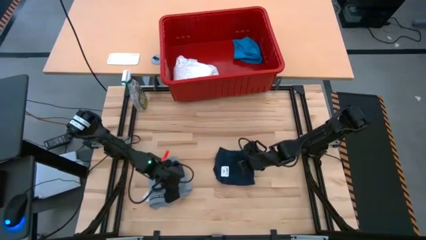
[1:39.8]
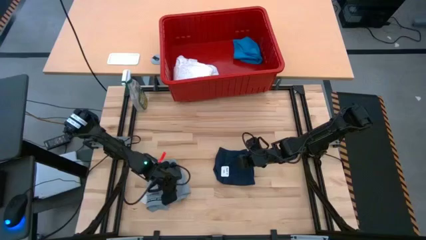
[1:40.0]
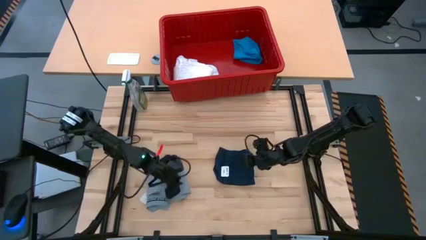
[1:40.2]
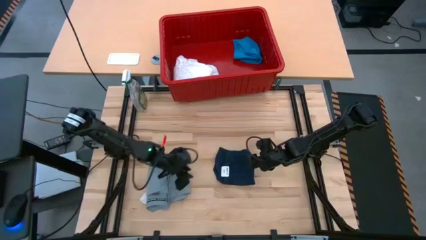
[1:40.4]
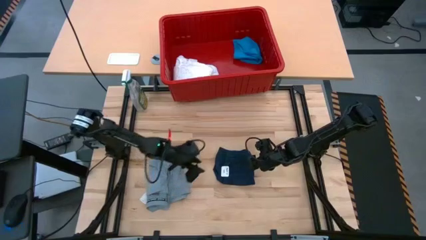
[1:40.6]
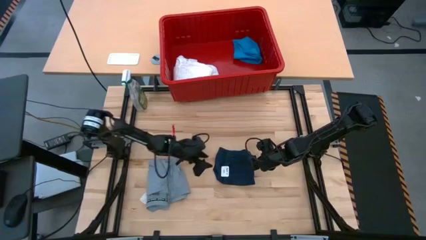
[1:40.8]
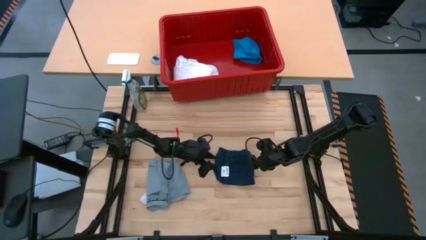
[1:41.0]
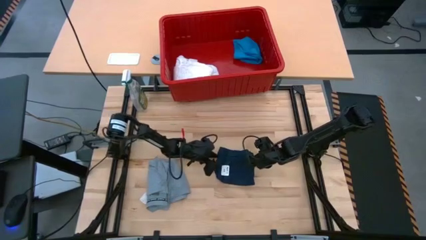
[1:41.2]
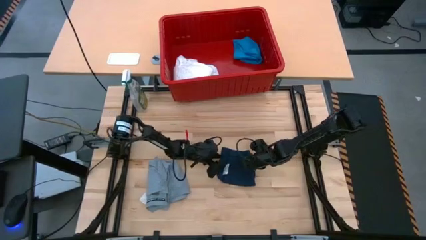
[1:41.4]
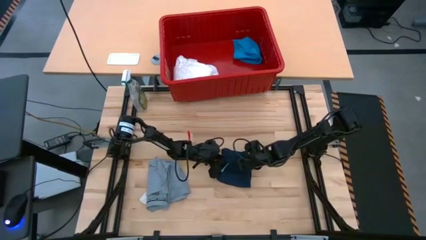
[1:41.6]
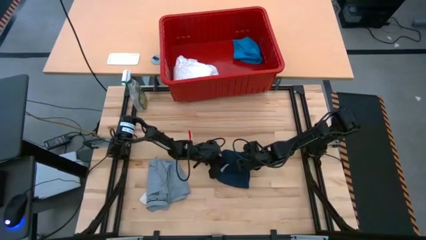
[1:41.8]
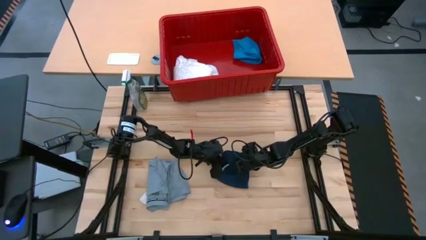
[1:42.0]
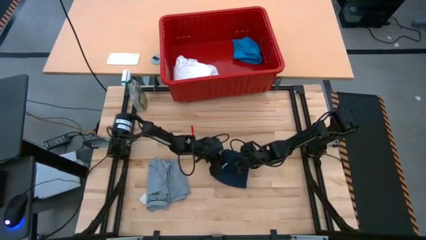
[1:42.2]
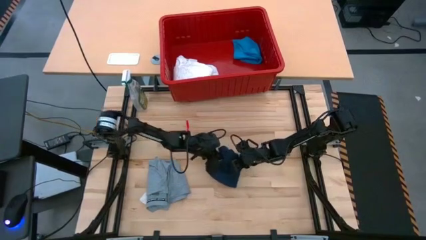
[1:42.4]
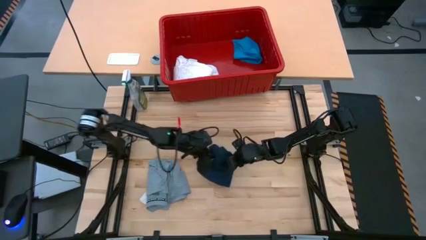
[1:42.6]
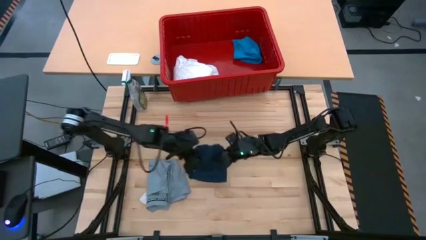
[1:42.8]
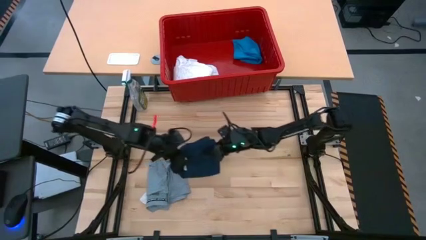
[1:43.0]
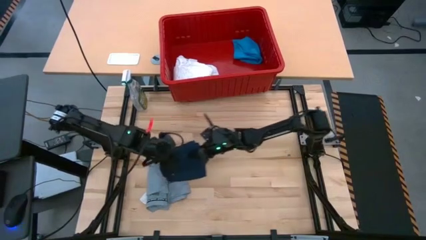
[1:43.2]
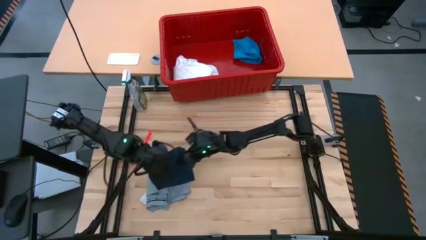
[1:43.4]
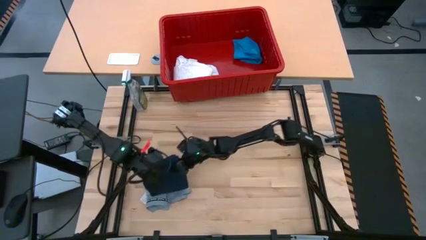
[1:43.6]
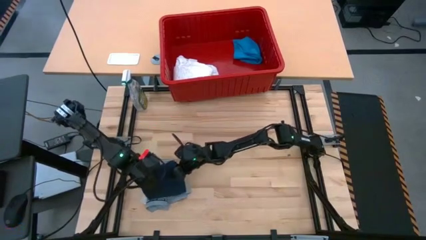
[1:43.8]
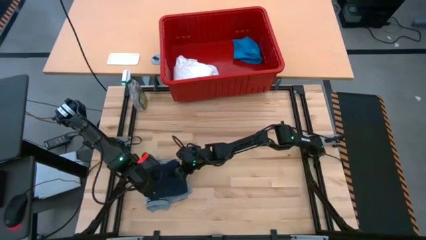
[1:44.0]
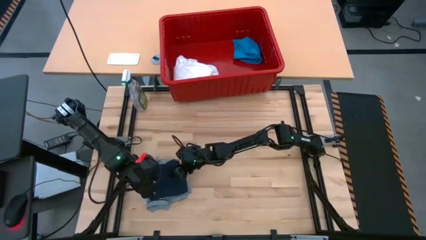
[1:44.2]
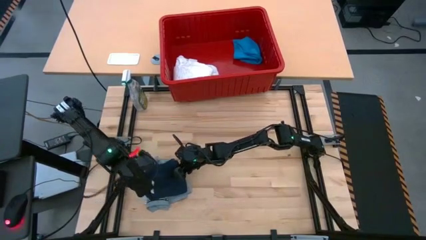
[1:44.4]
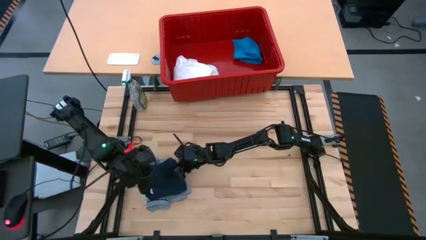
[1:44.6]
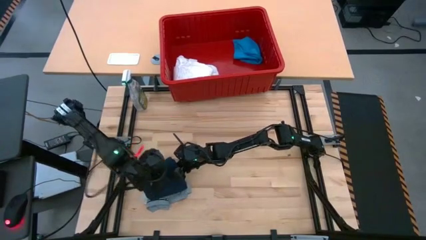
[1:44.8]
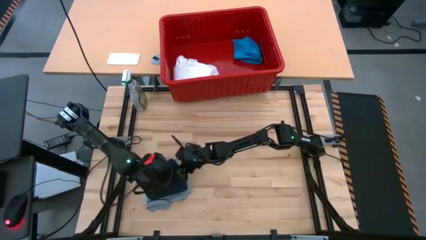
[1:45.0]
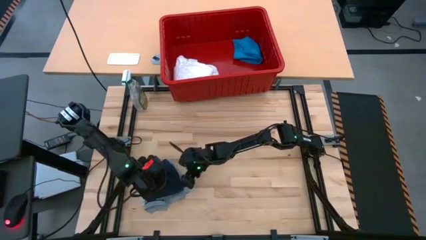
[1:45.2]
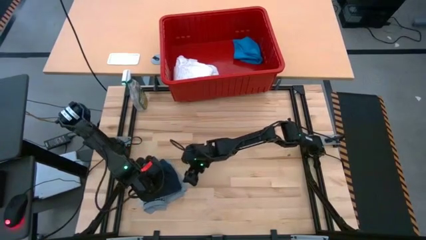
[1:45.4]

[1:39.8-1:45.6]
Task: Fold laundry
Stack the folded black pants on top of the gray shirt

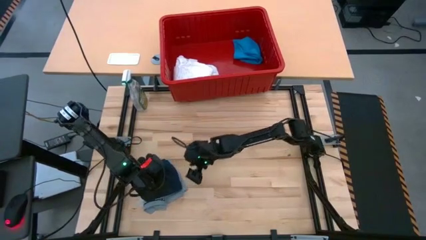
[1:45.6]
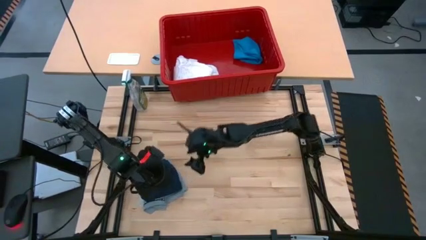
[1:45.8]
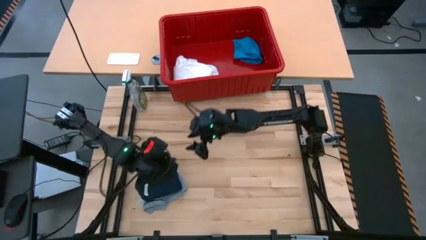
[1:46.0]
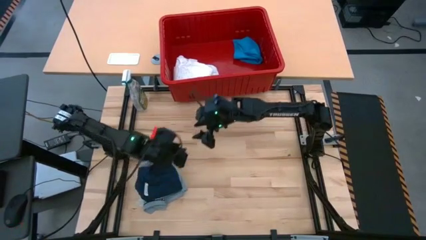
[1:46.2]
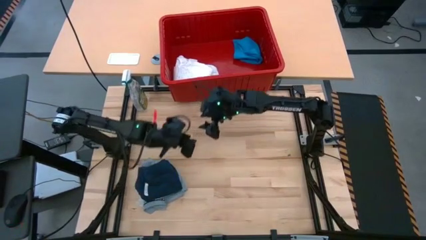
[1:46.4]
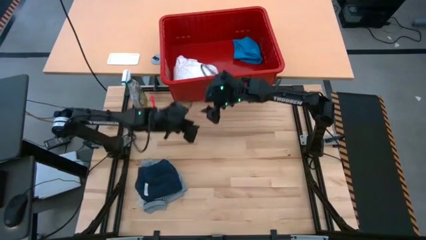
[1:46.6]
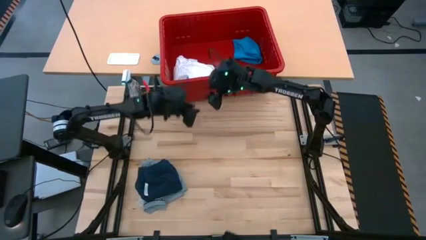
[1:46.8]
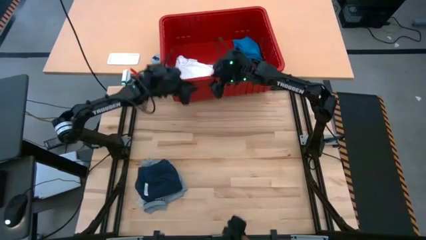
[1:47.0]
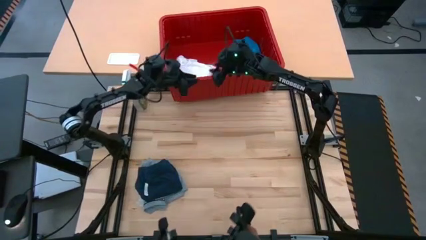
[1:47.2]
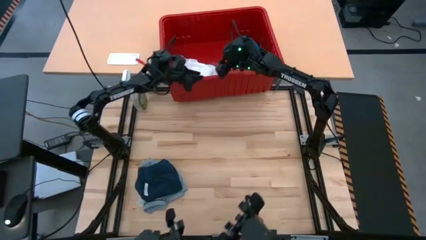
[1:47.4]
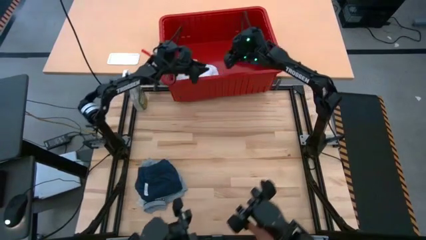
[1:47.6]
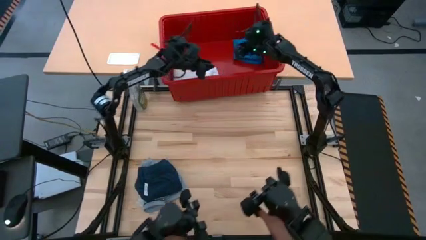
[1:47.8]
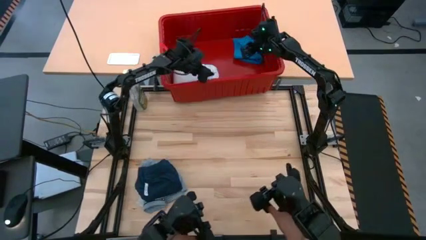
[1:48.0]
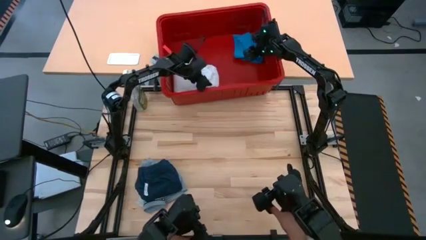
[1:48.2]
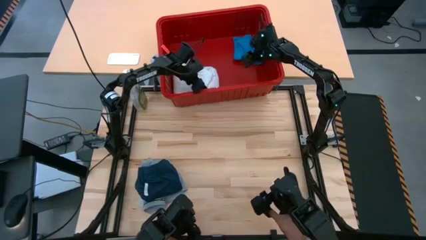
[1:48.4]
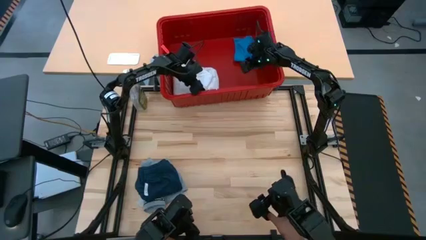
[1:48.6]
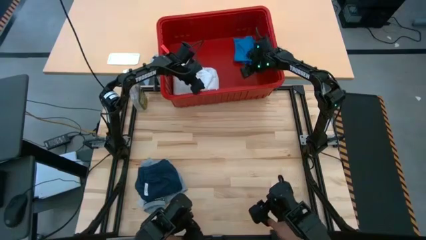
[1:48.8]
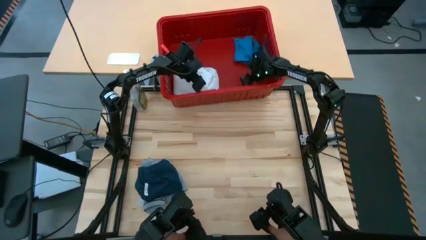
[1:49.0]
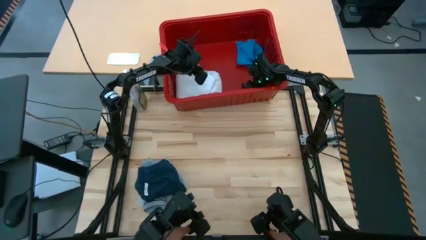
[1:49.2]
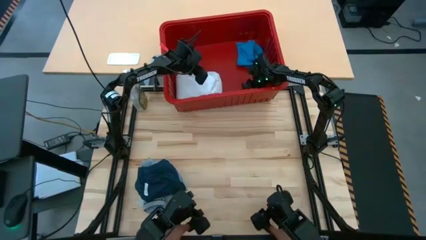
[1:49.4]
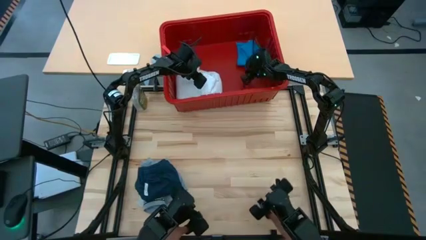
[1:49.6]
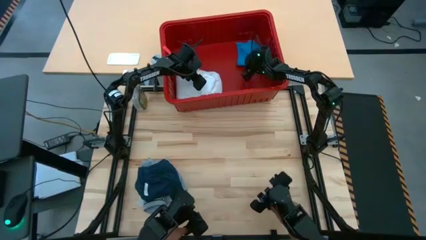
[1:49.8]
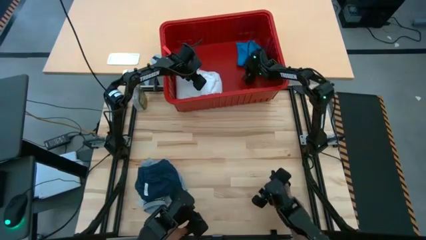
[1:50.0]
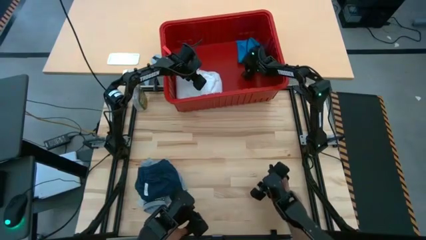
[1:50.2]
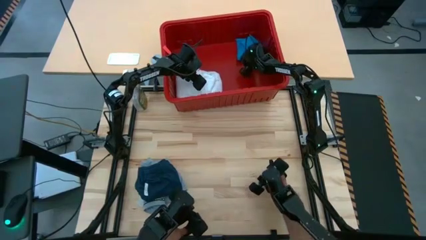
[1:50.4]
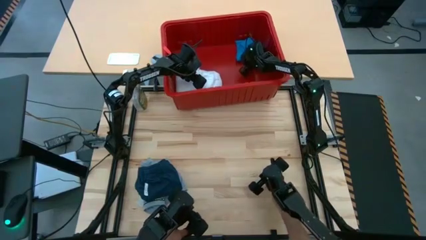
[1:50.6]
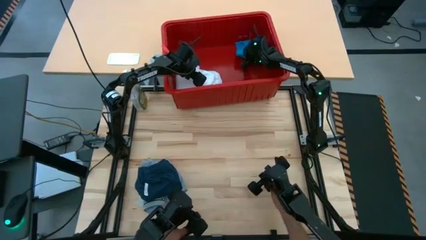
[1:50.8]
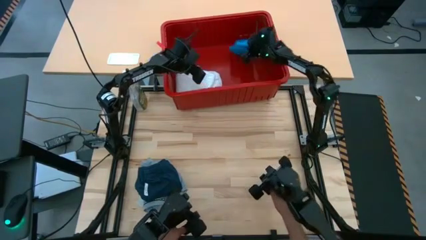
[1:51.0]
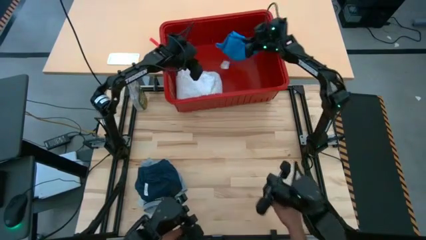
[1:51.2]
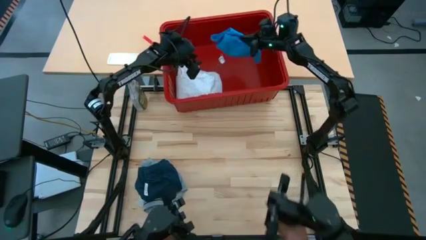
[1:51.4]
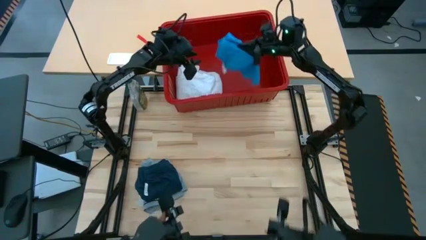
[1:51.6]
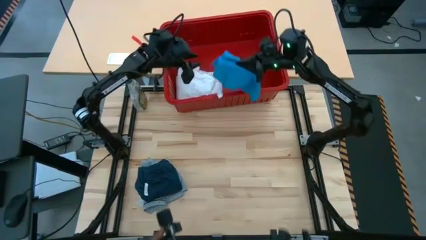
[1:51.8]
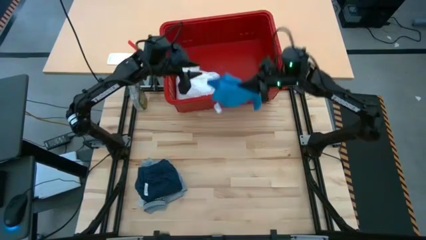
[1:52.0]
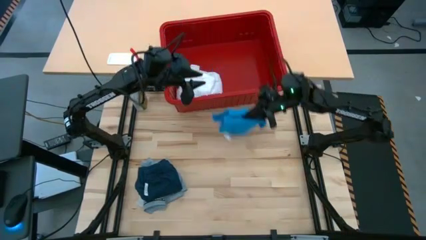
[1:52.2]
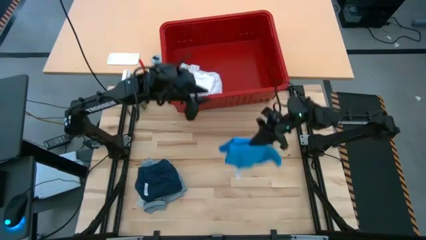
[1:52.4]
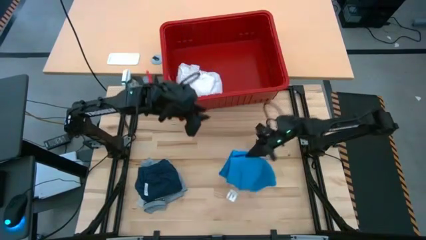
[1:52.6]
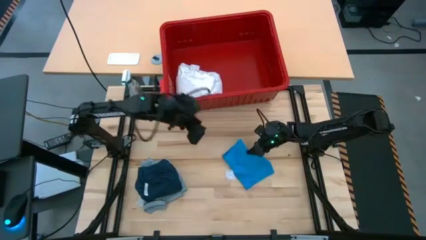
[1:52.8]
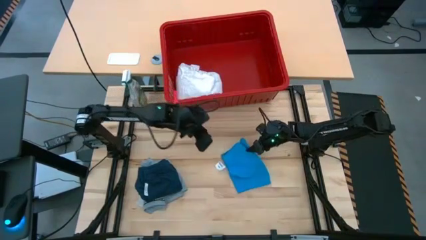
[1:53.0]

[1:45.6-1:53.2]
Remove the blue pants from the red laundry bin

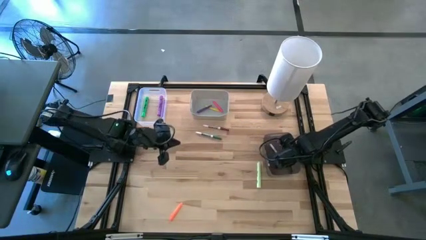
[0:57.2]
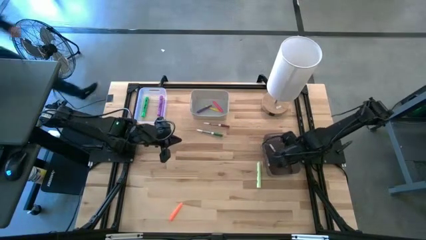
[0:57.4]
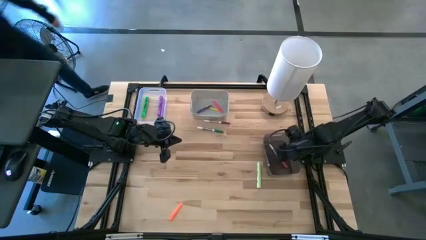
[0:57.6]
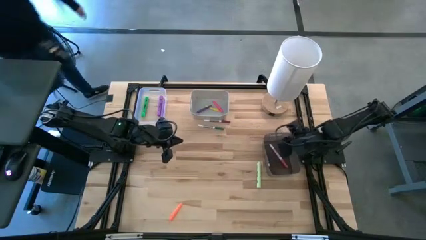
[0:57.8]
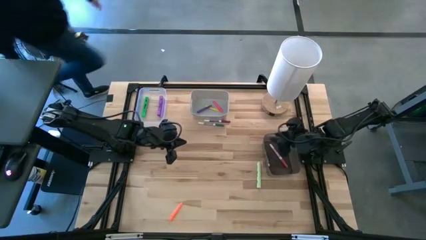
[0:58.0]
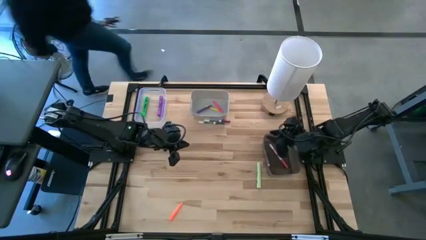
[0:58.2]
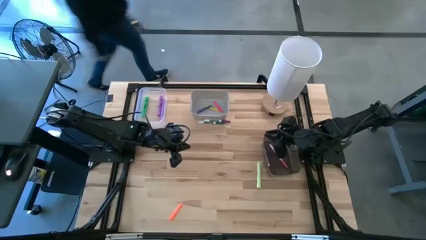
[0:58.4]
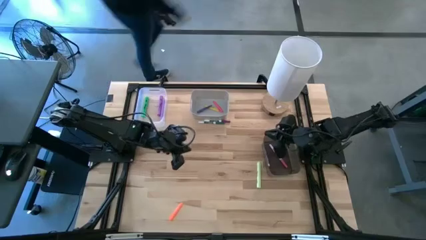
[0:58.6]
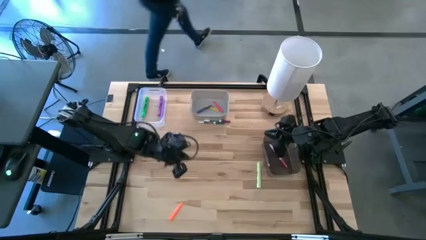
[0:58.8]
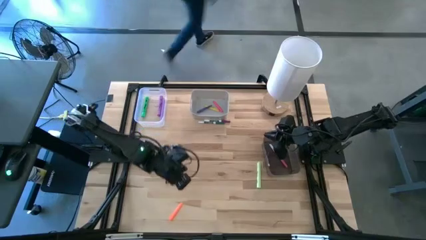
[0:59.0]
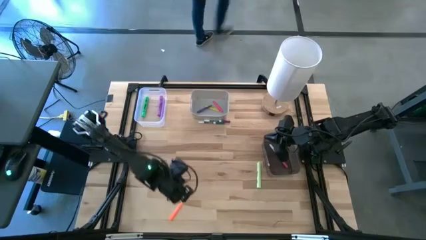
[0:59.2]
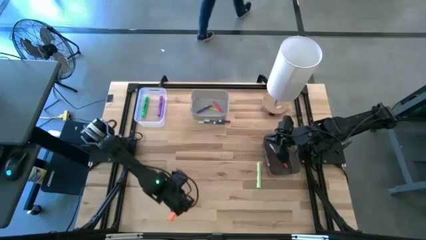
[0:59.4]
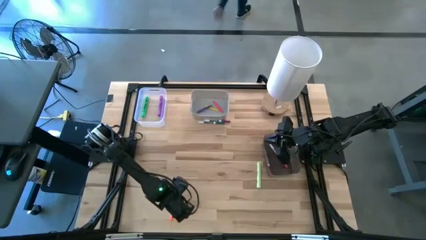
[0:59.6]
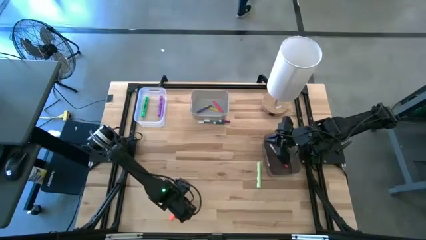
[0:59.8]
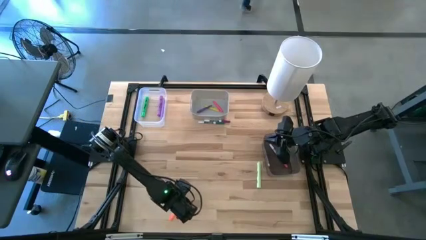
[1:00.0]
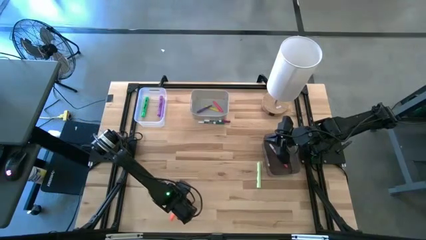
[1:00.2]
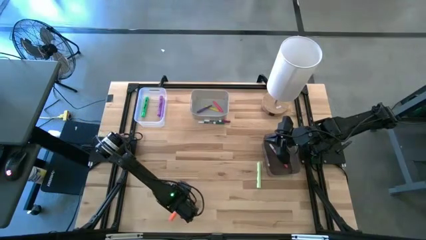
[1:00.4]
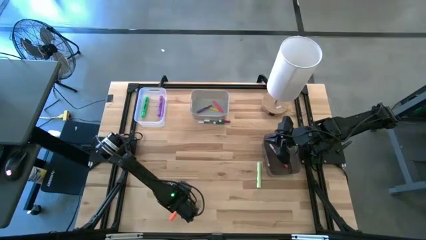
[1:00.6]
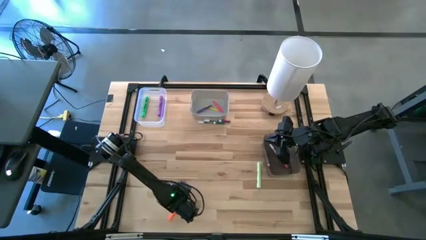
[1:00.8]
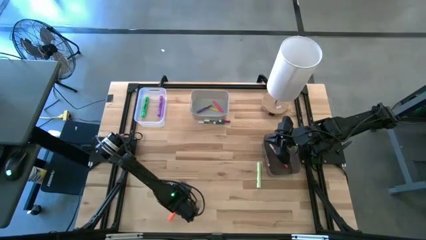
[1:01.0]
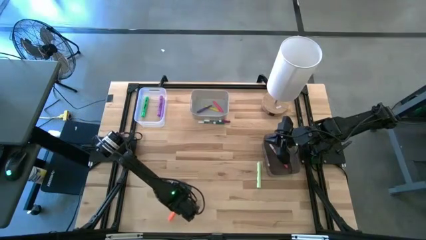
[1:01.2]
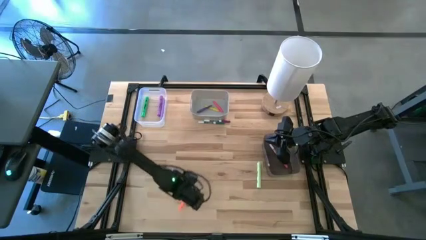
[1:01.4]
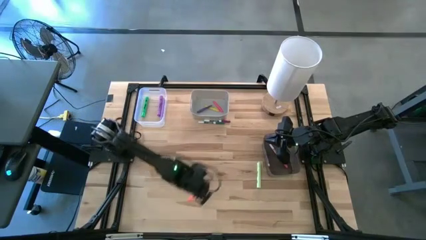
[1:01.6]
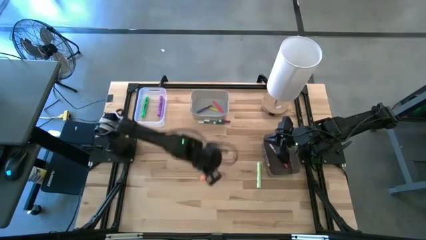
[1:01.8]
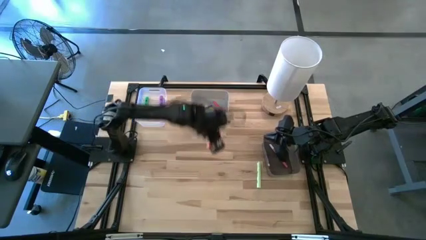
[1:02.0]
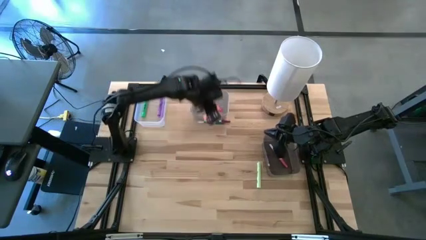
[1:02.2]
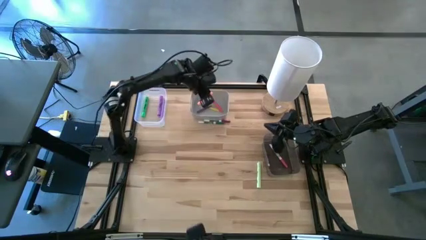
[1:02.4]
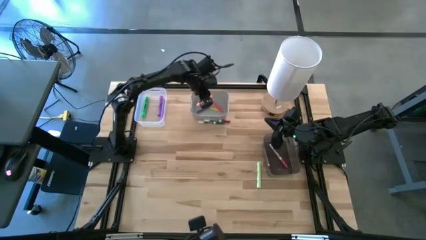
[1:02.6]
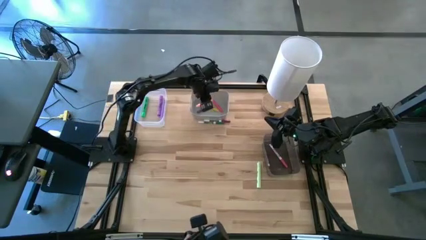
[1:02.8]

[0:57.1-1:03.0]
Task: Pick & Place Markers
Put the orange pen into the gray bin
